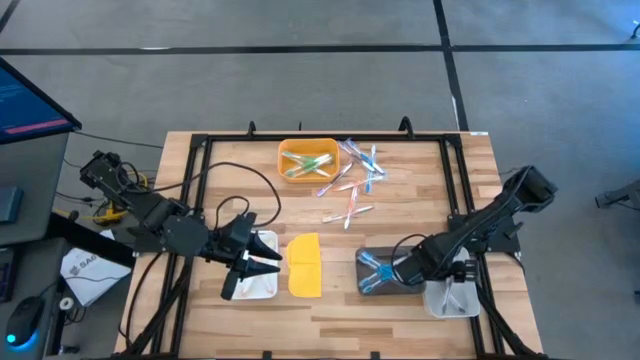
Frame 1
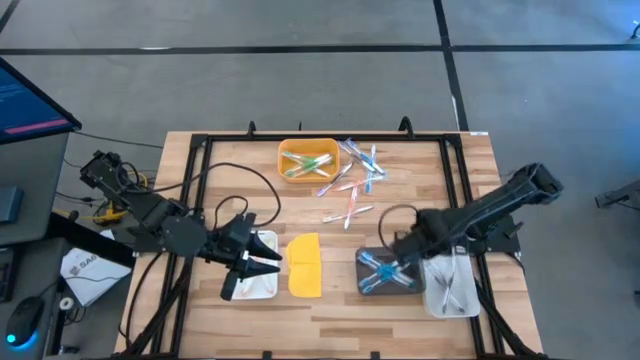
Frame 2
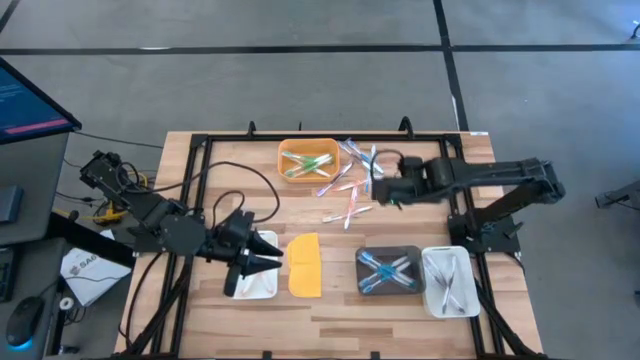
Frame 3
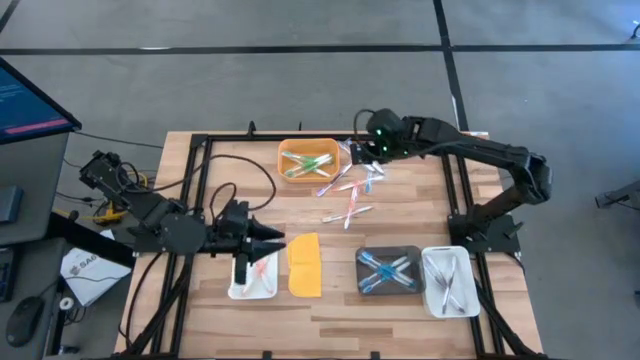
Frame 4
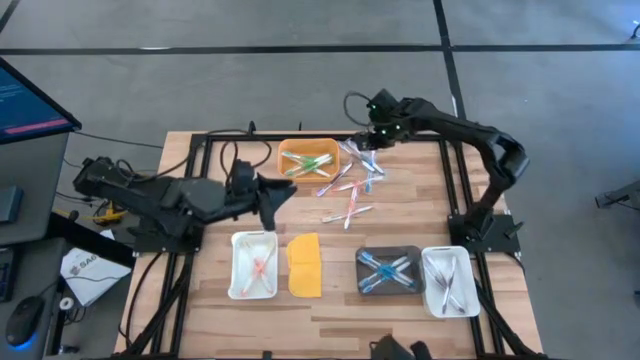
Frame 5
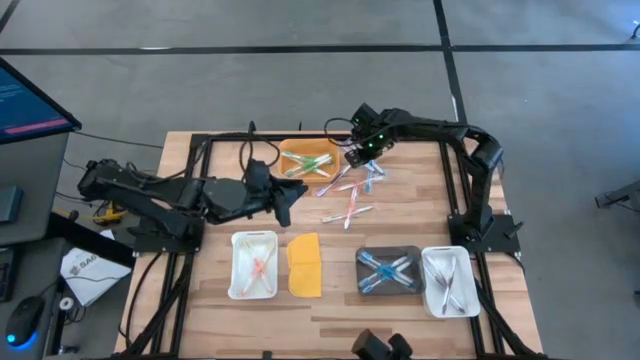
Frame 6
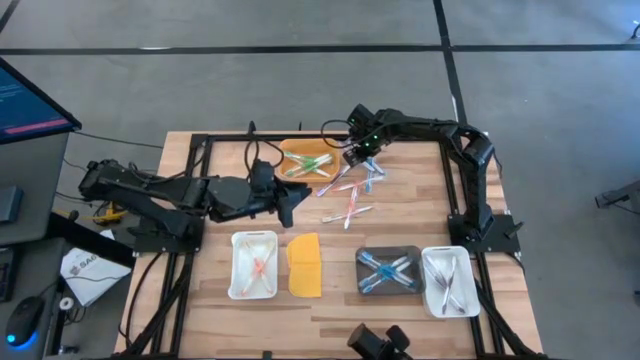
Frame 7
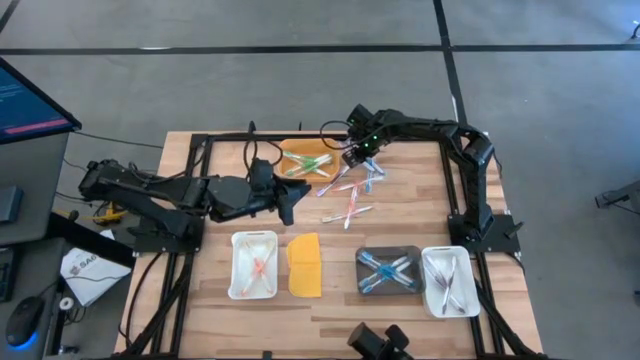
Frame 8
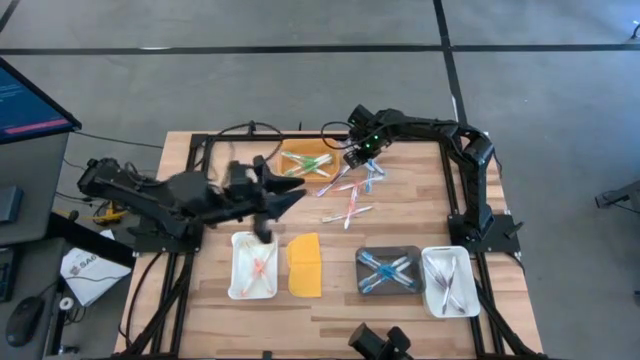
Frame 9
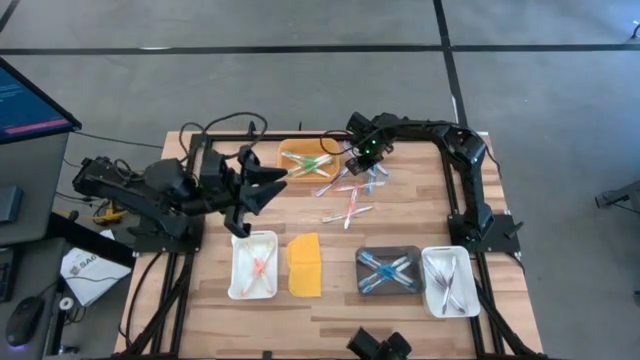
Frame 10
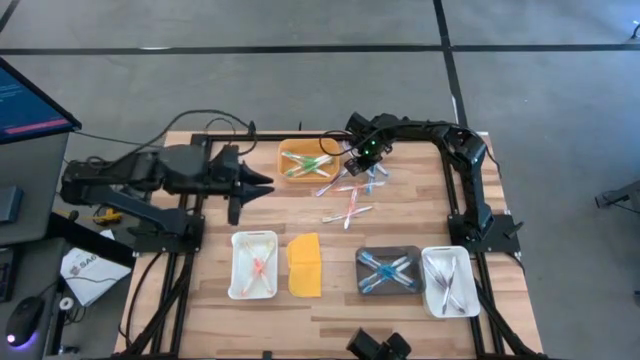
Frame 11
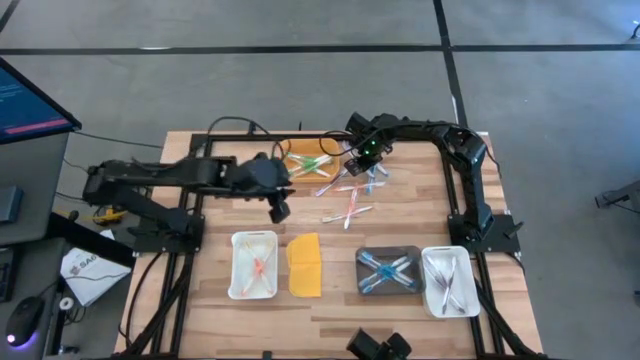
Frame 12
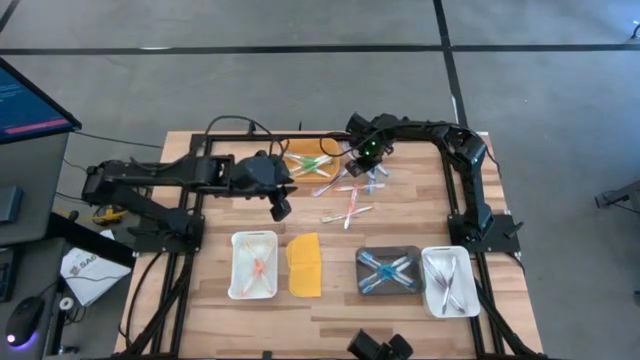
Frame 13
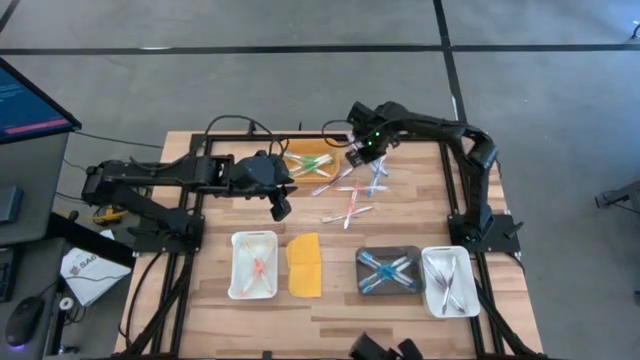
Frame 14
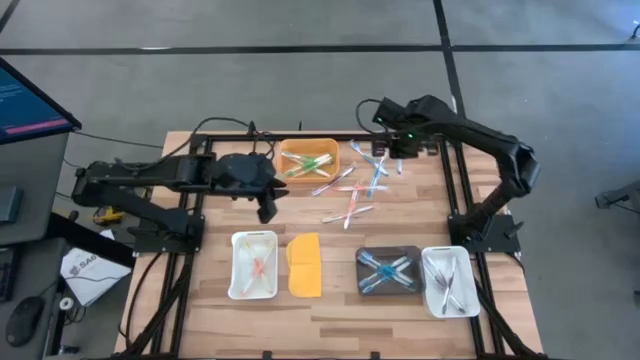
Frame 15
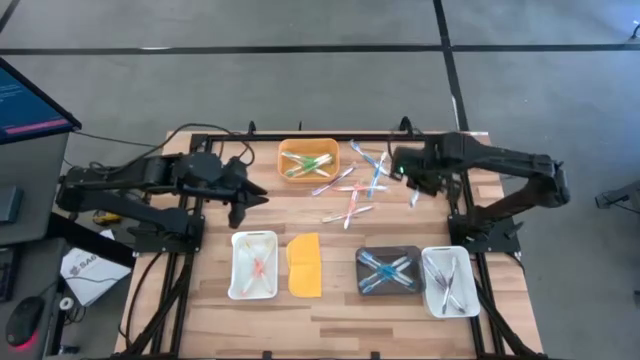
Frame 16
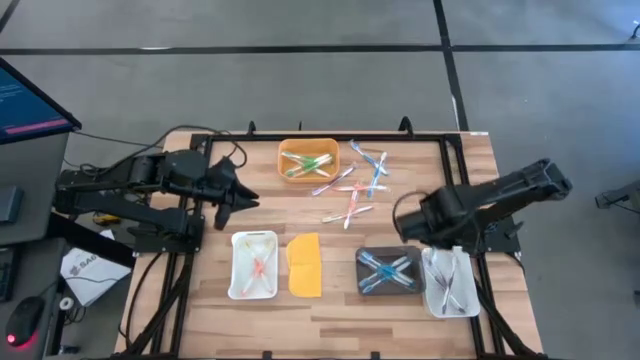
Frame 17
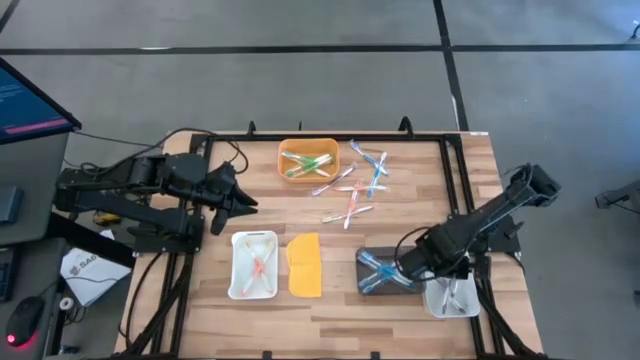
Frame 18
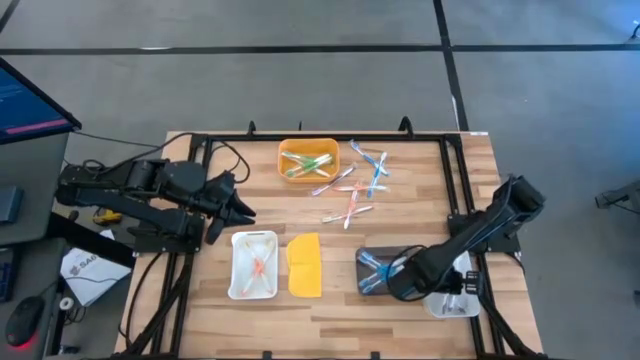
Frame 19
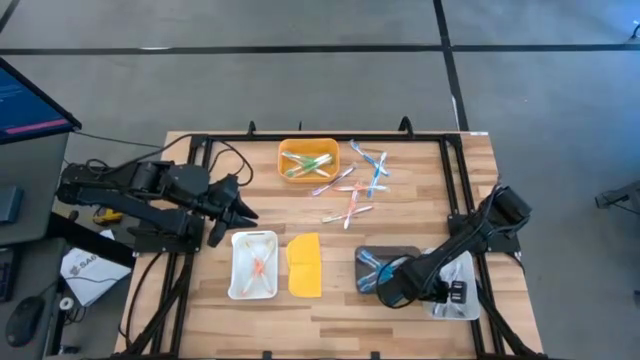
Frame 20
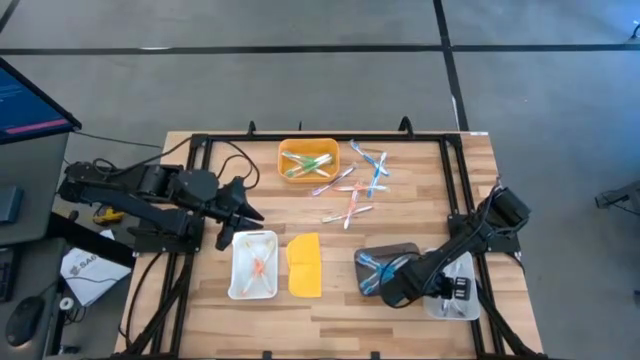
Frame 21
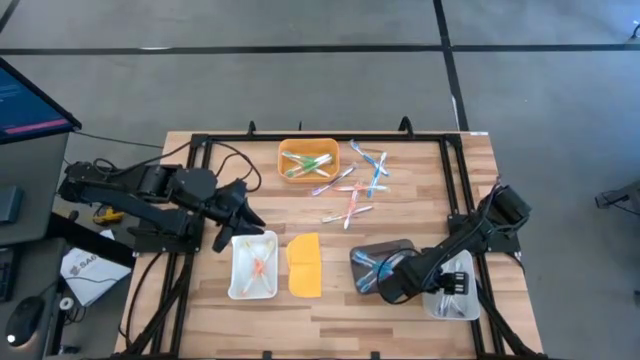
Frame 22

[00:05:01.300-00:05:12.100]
Task: Pick & Place Toothbrushes
Put the purple toothbrush into the right white bin

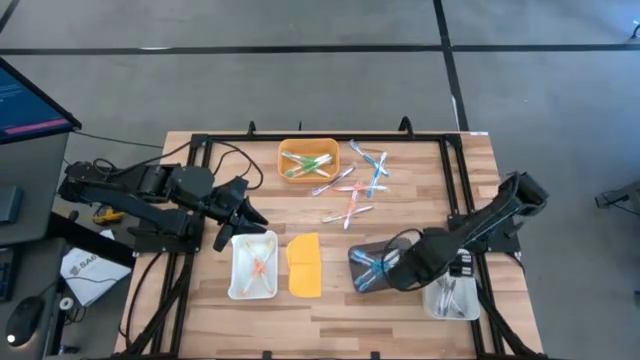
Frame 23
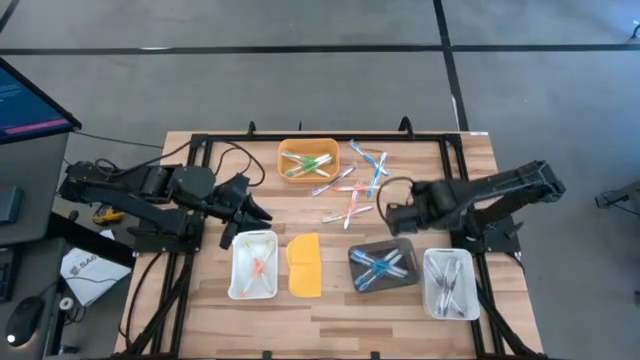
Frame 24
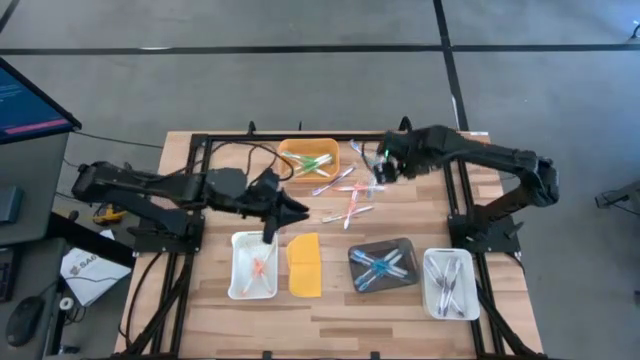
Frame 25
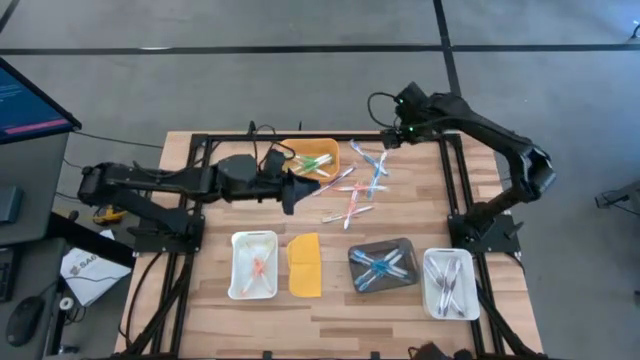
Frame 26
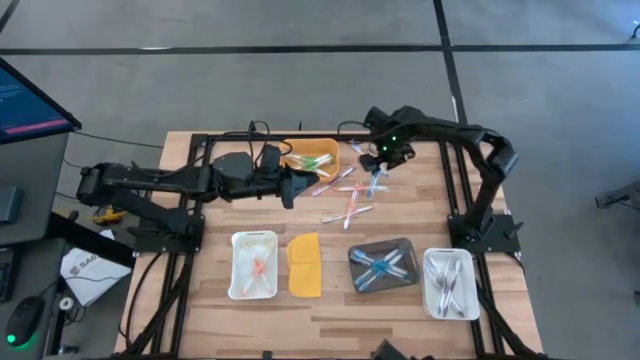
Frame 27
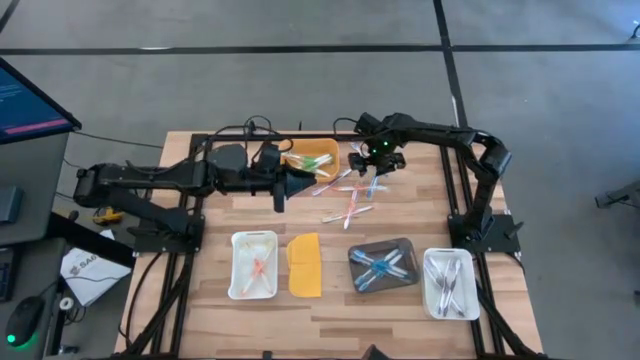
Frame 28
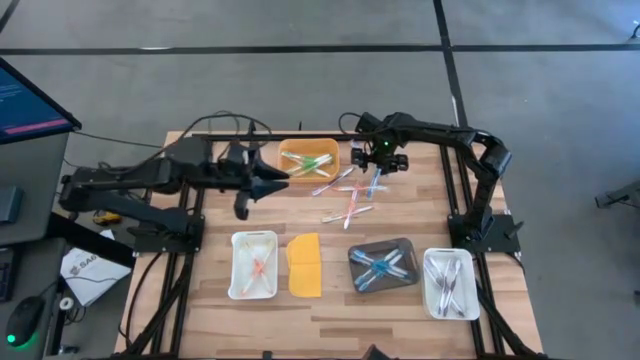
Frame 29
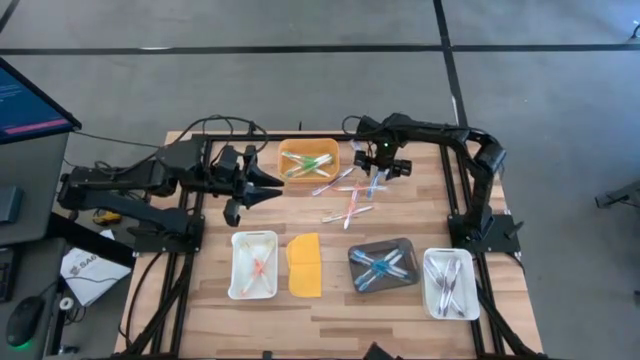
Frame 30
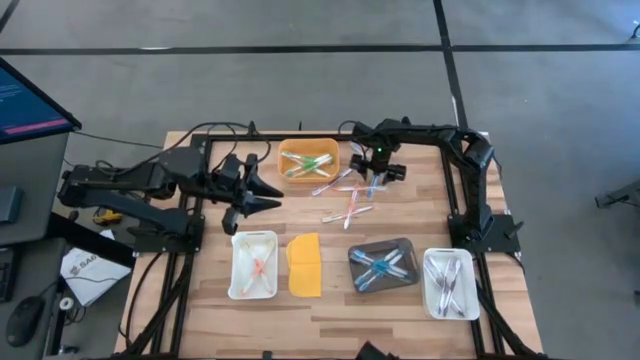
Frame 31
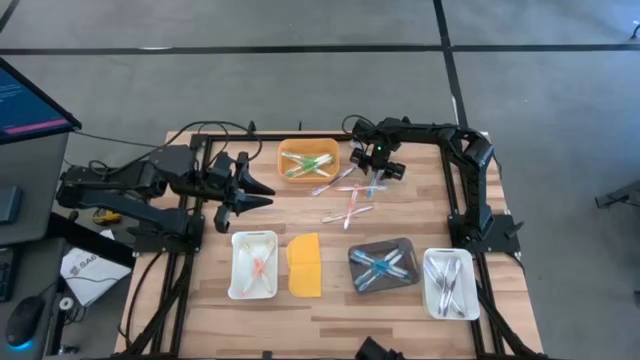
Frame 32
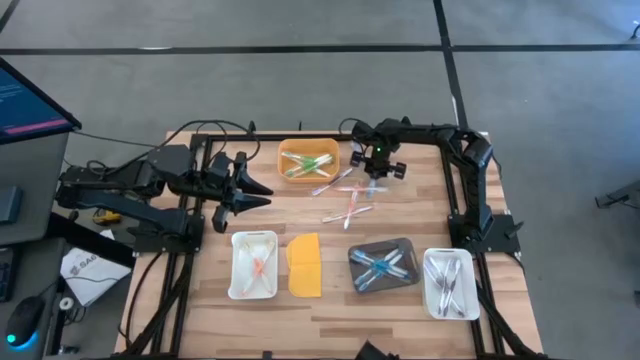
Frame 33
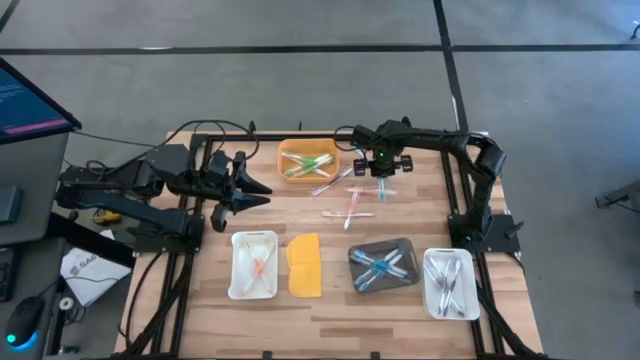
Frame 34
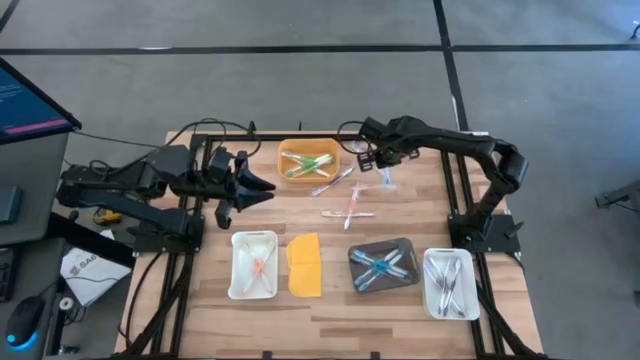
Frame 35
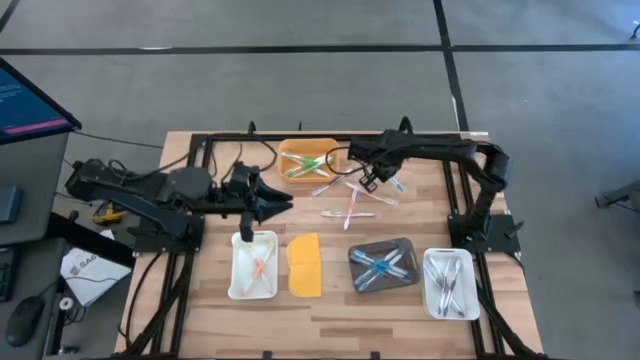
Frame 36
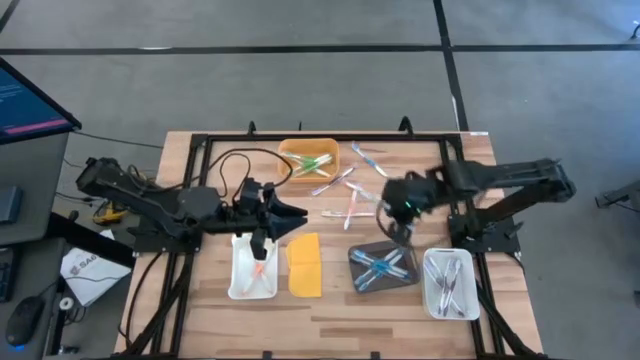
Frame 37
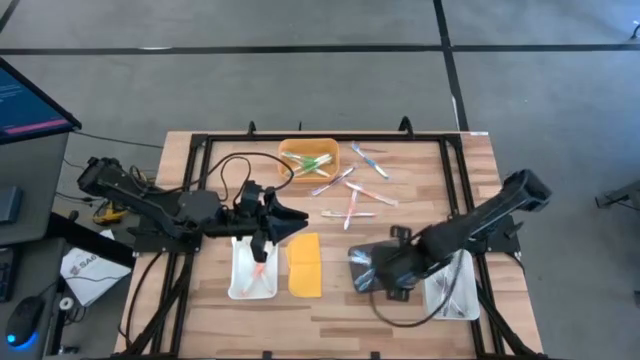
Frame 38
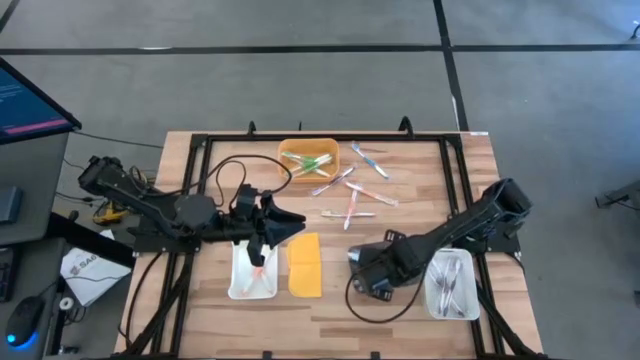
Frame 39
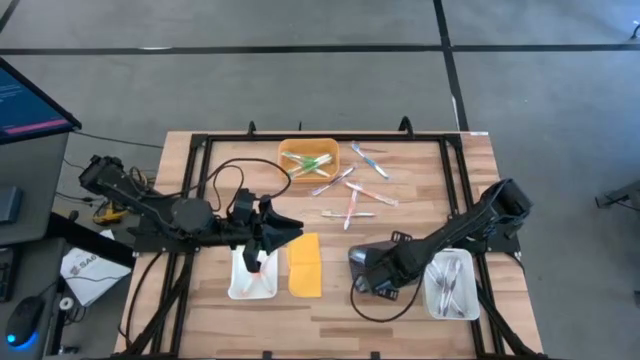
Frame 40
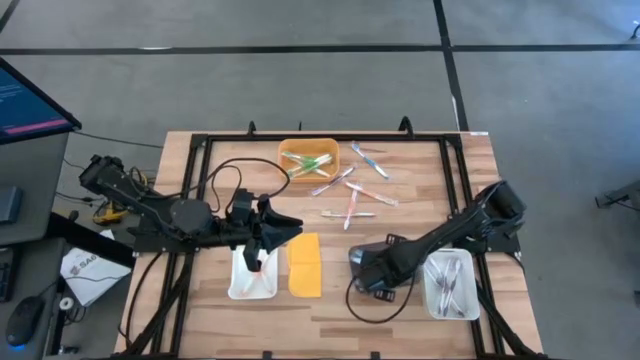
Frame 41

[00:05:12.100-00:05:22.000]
Put the blue toothbrush into the black bin

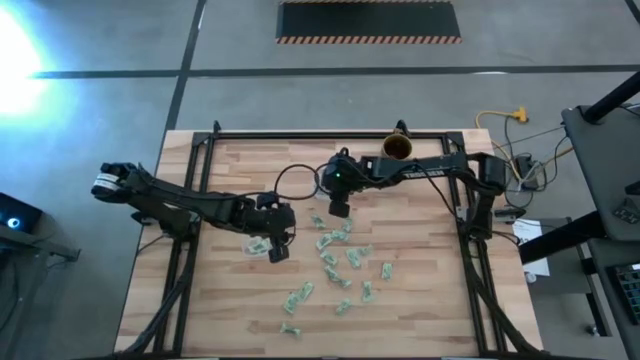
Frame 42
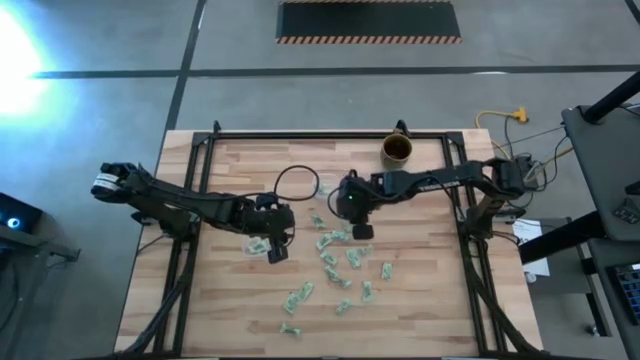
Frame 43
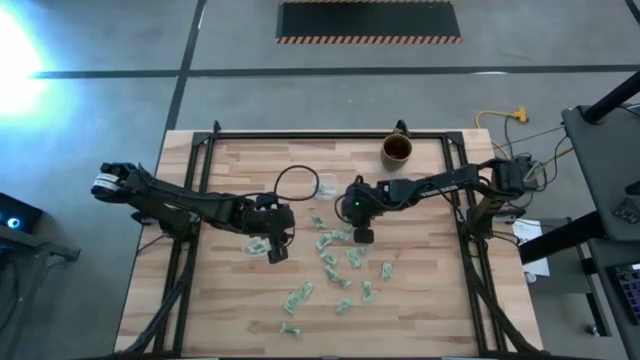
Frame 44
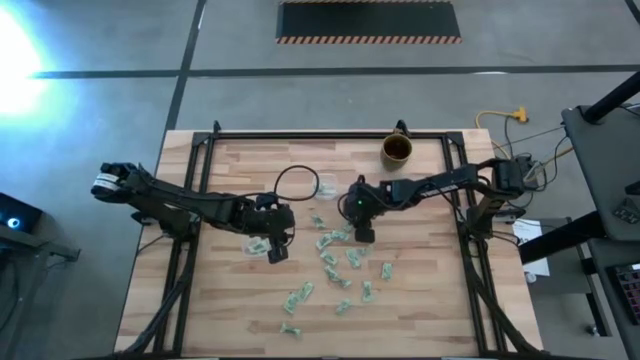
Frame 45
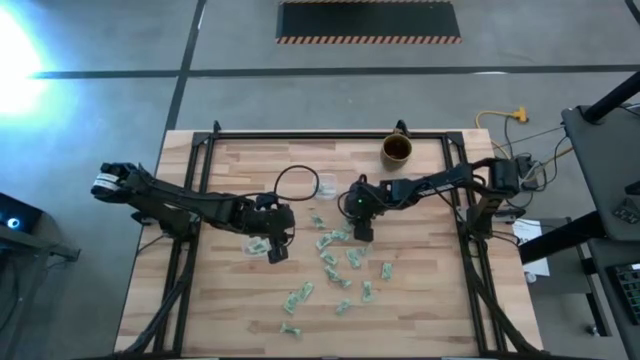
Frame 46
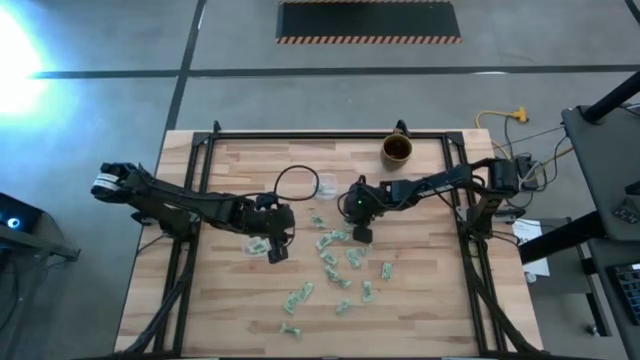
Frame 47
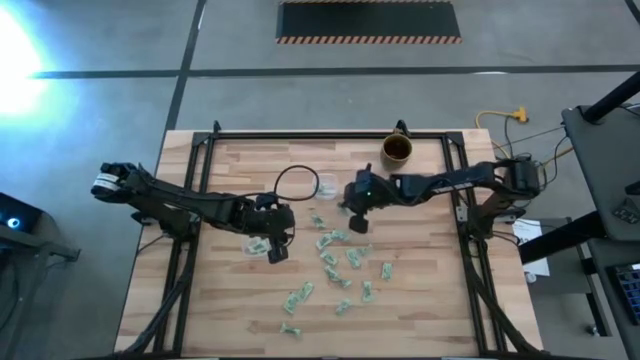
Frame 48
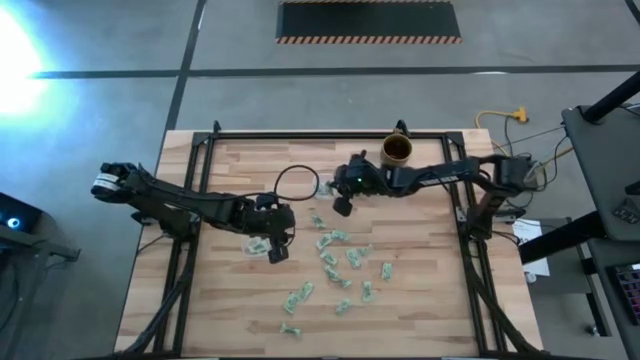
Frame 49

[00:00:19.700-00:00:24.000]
Task: Pick and place Stevia / Truvia into bins
Put the stevia packet into the top transparent container
